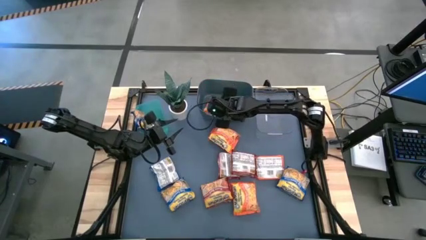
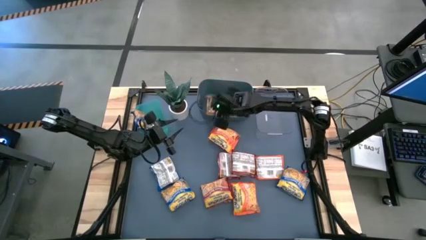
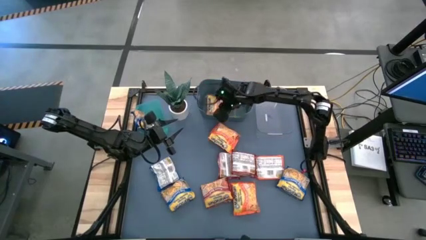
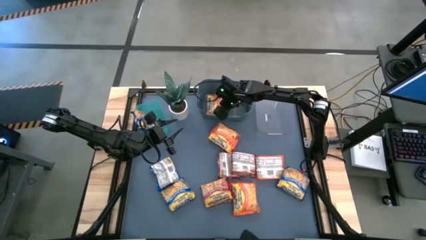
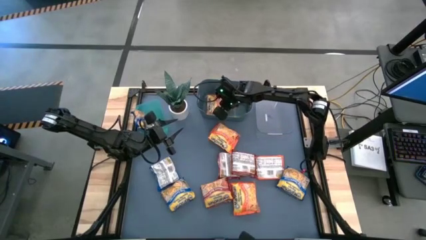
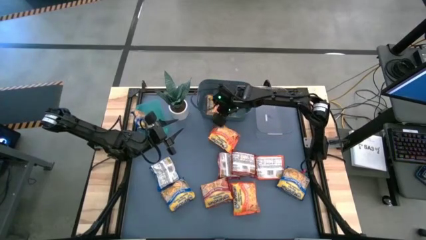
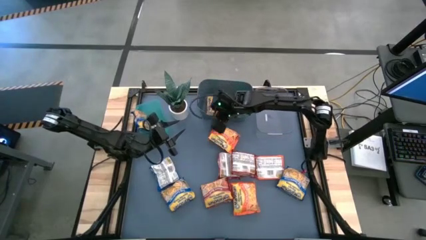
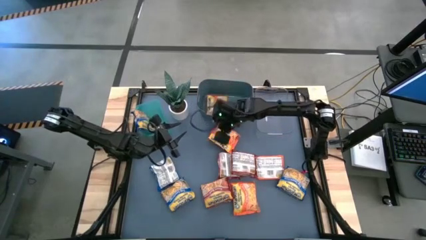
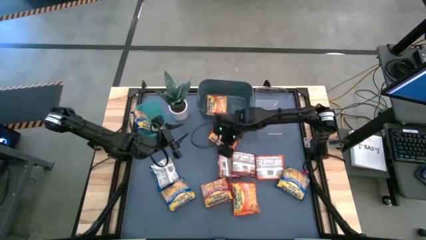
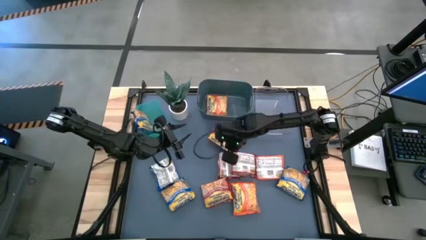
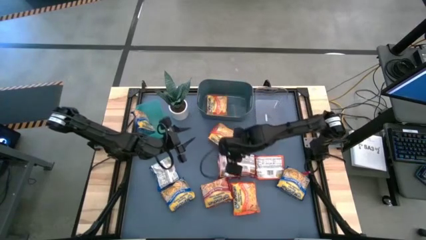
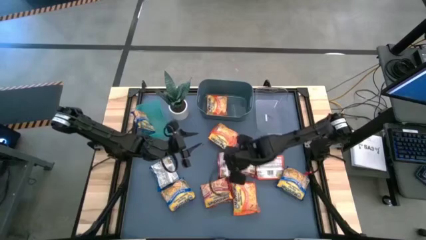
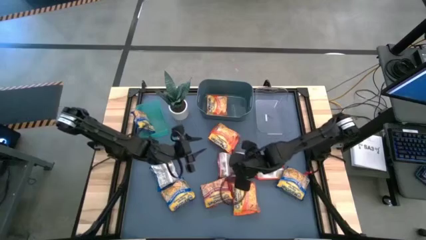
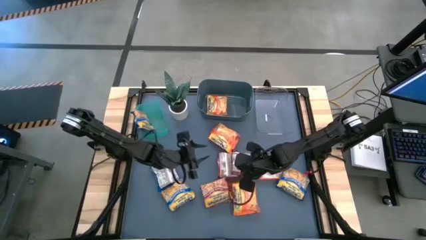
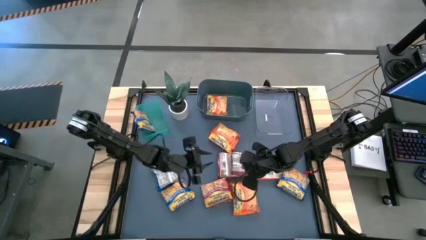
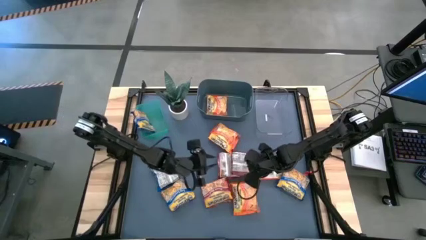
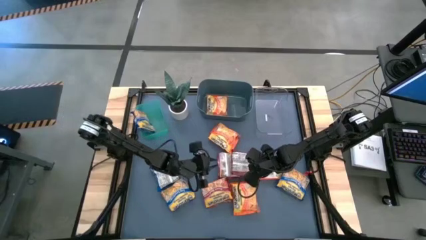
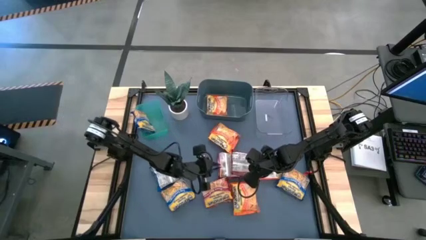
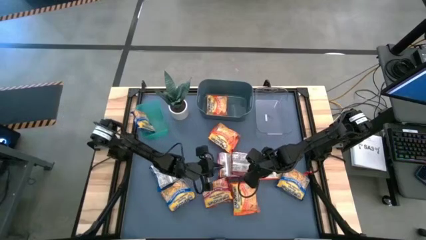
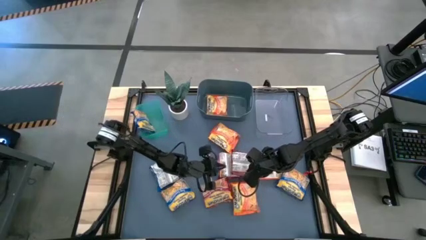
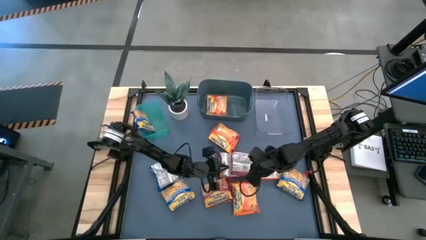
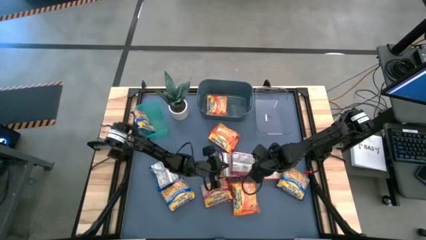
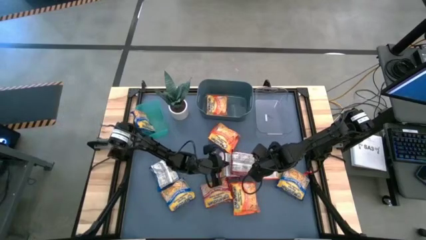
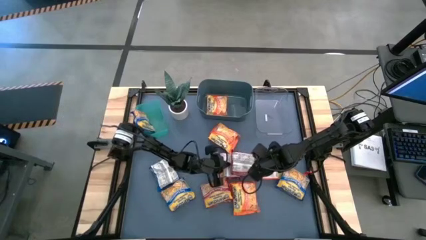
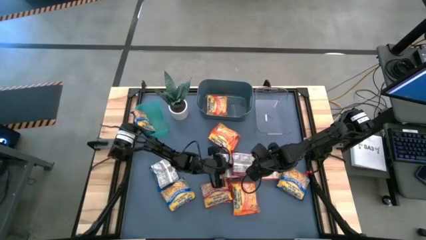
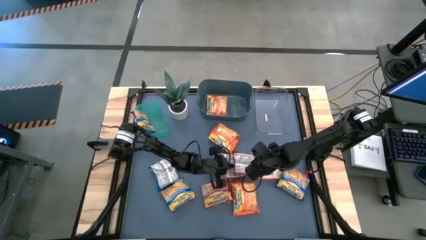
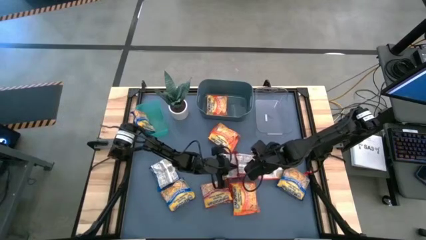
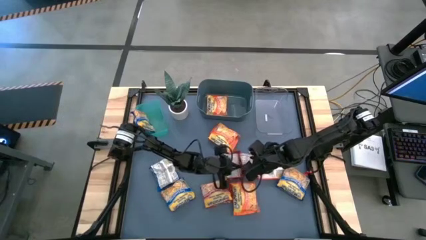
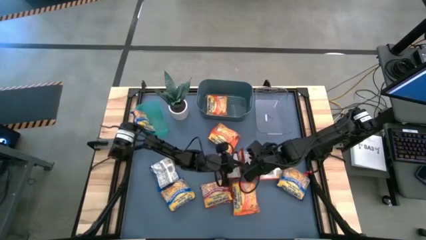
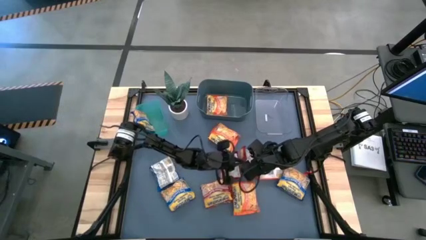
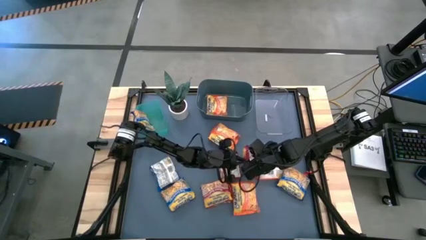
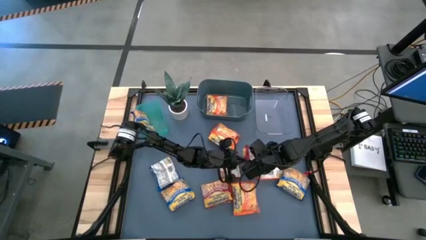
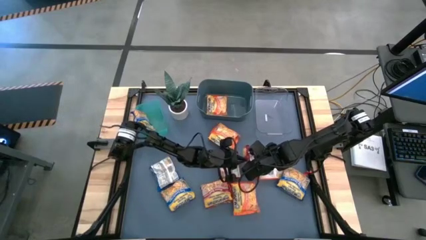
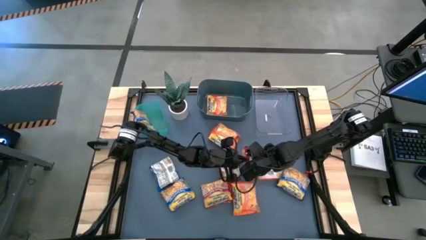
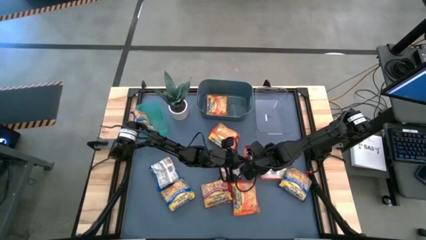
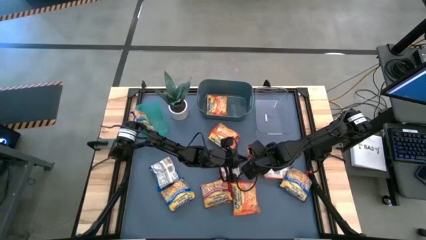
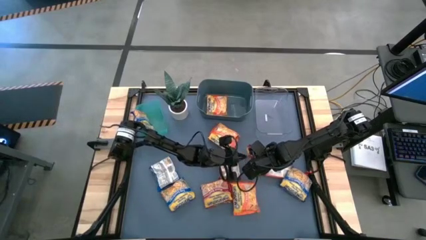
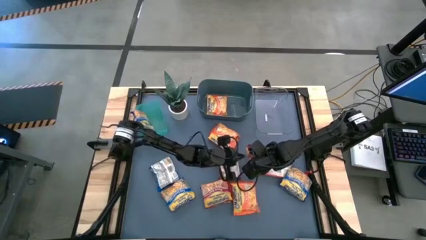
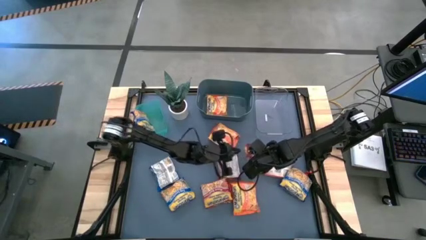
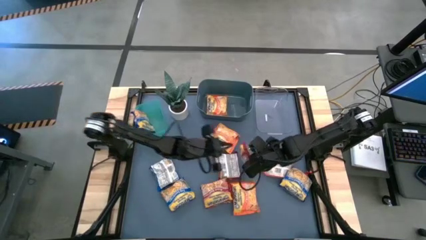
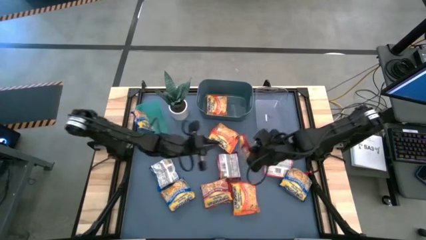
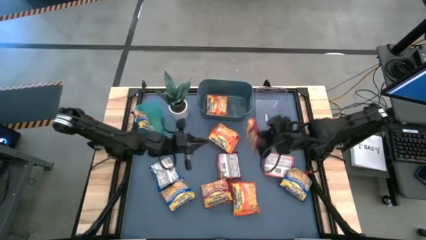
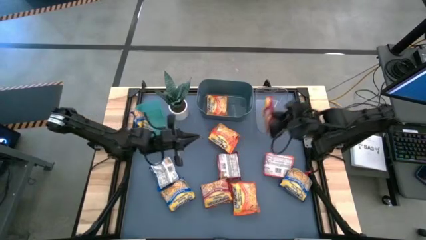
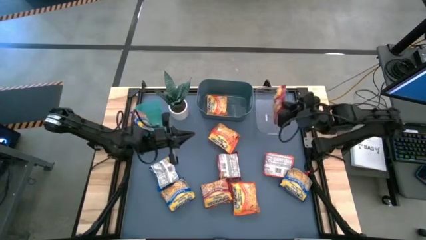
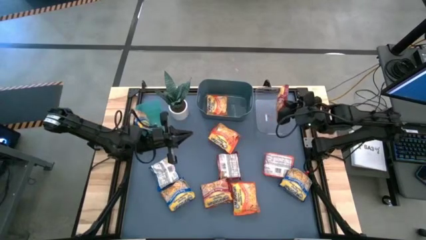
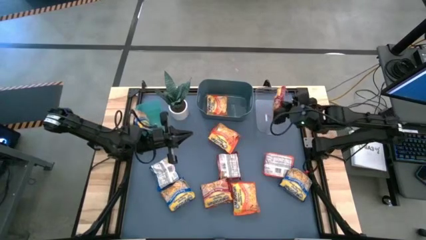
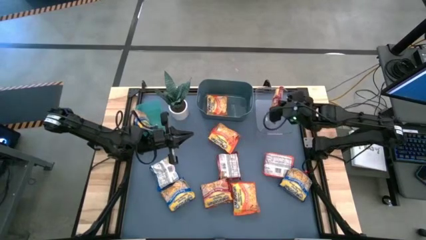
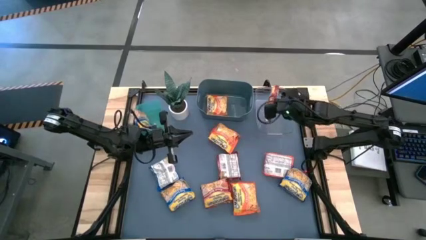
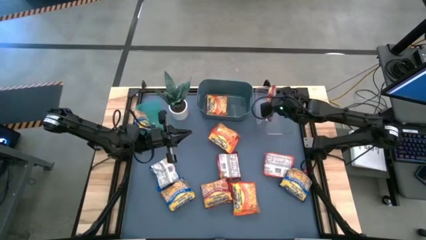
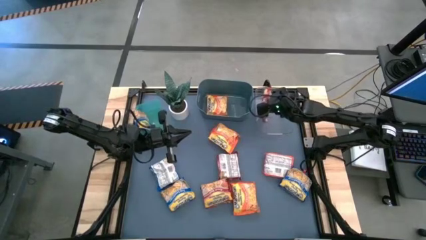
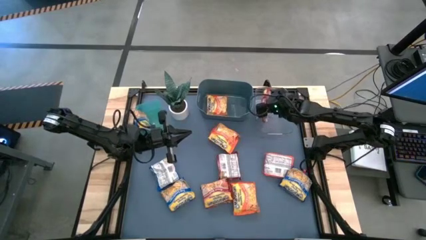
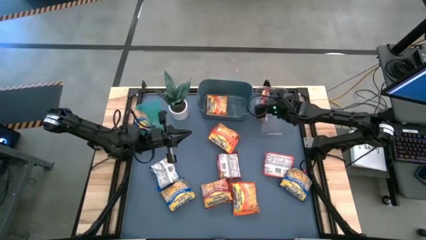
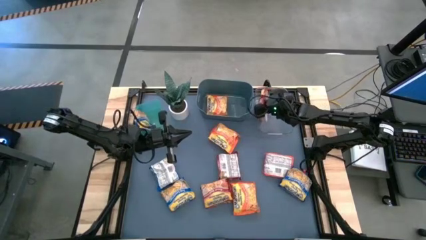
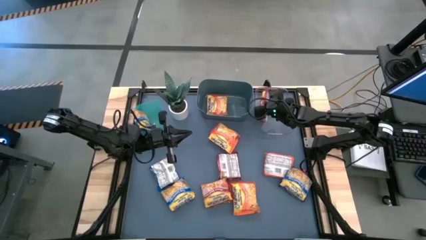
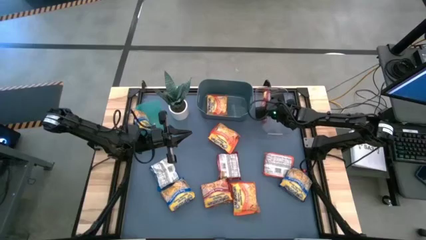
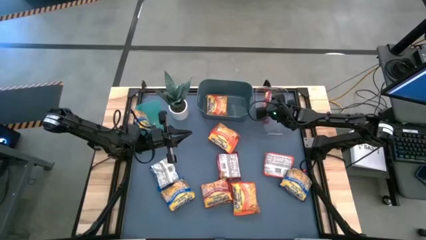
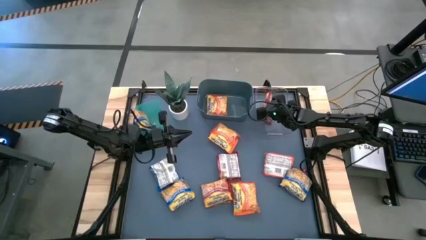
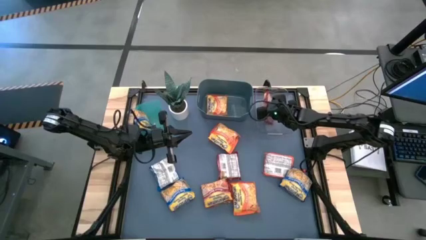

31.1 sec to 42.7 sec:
Task: Sort Maruchan noodles
Put the red noodle pack into the transparent bin

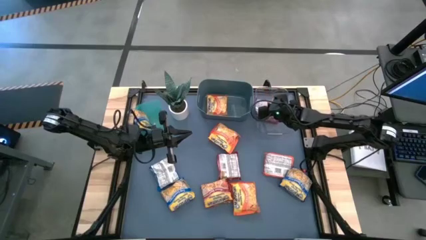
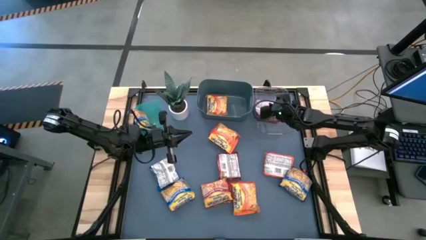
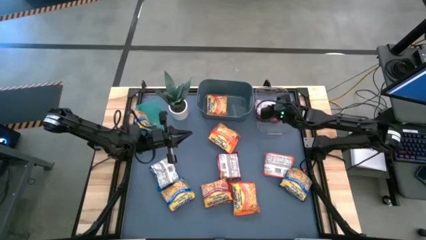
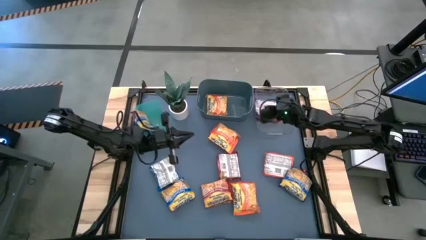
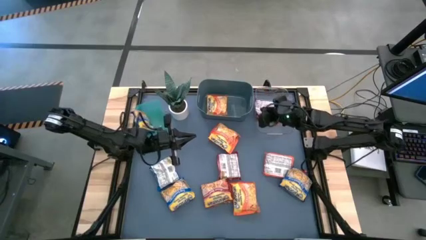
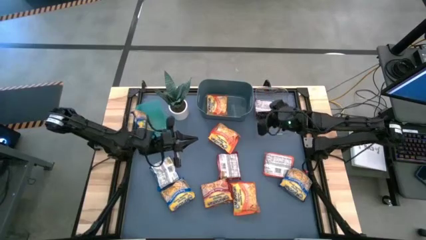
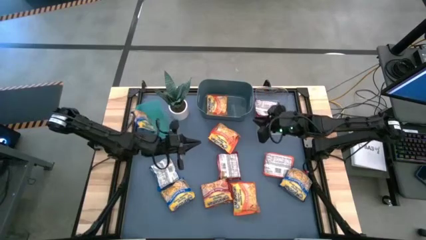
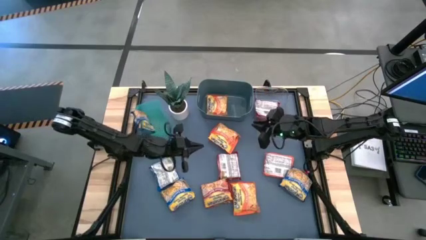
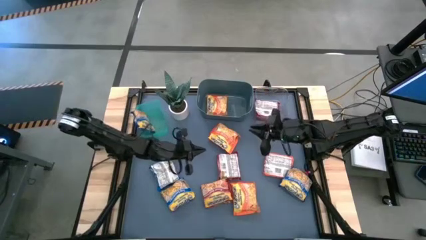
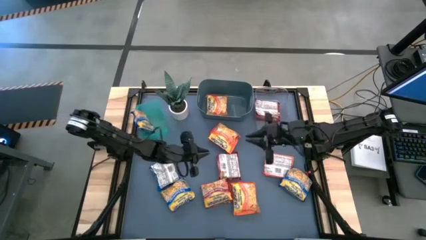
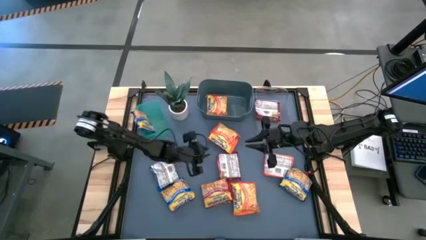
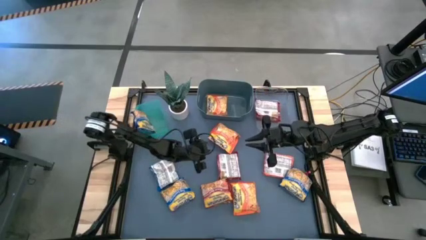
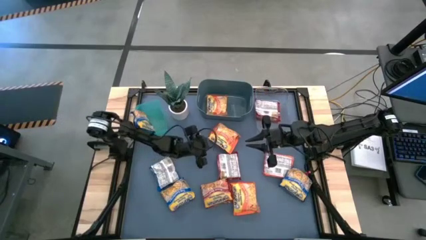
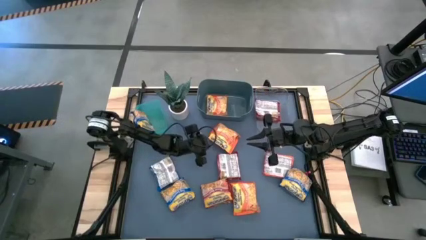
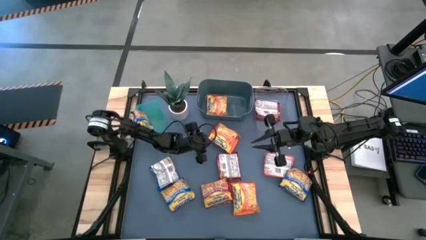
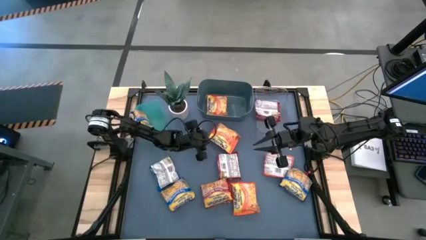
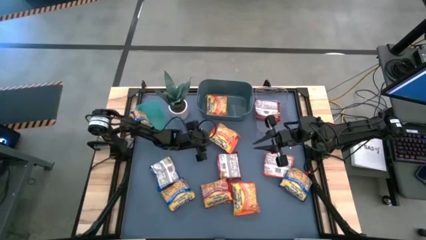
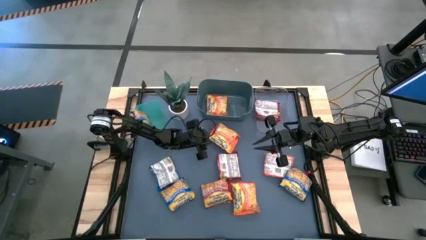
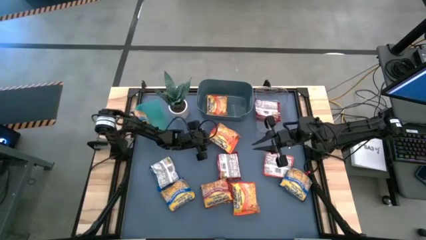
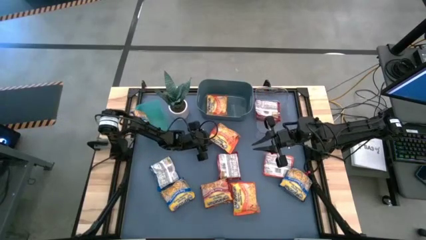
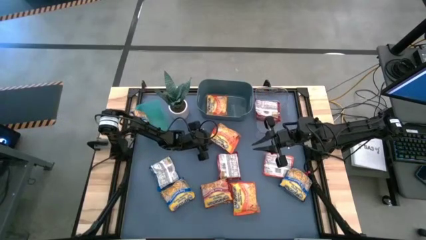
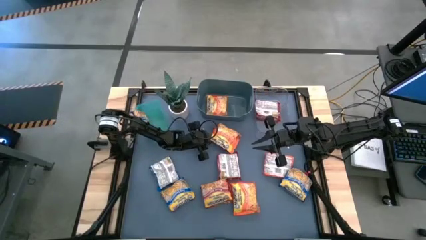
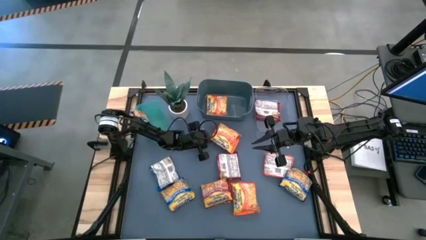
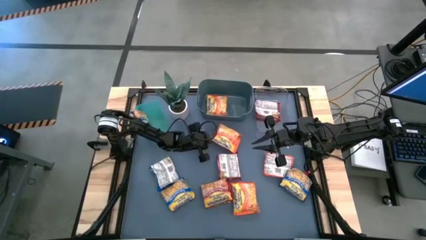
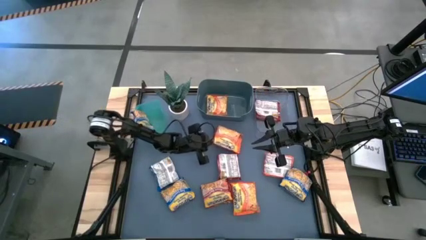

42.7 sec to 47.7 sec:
Put the orange noodle pack into the blue bin
